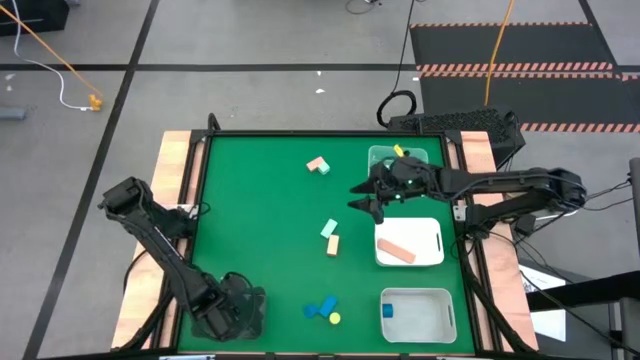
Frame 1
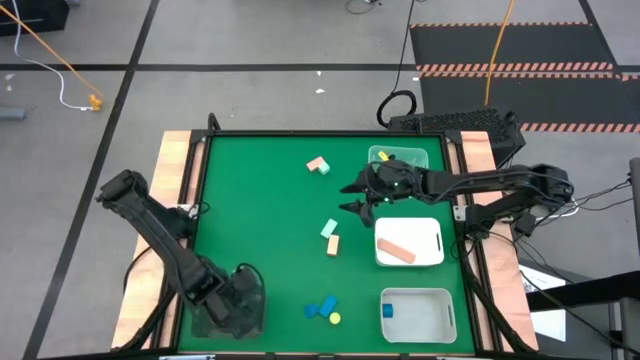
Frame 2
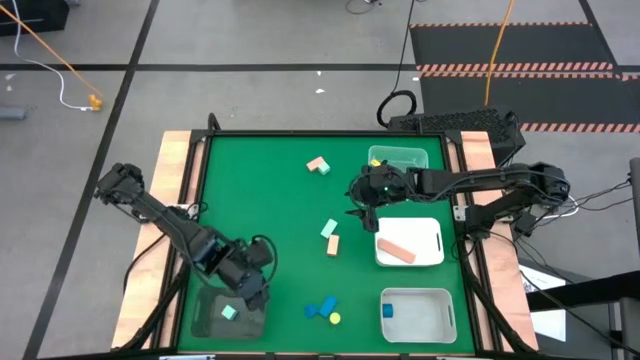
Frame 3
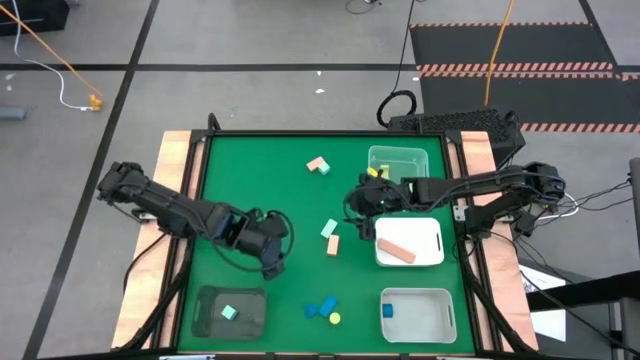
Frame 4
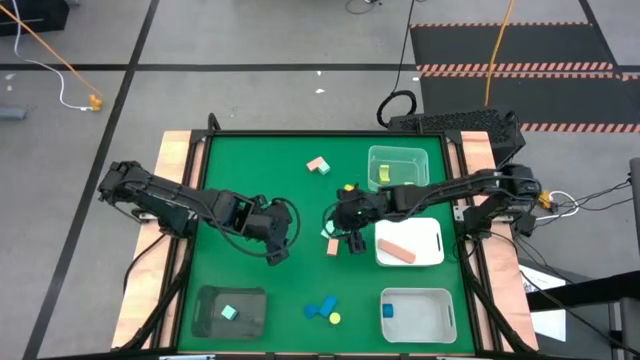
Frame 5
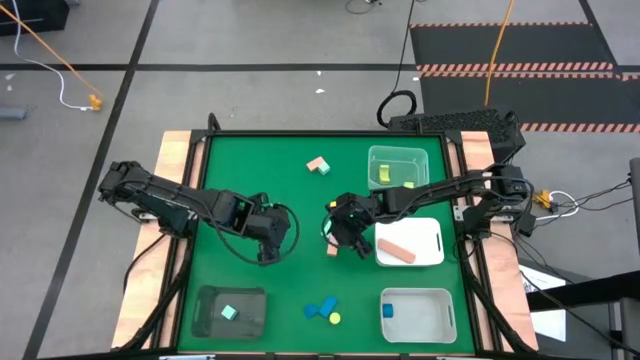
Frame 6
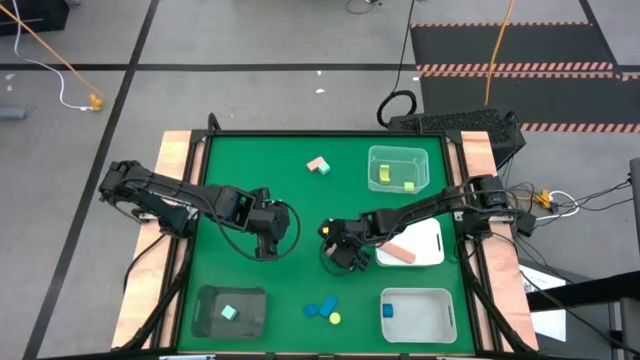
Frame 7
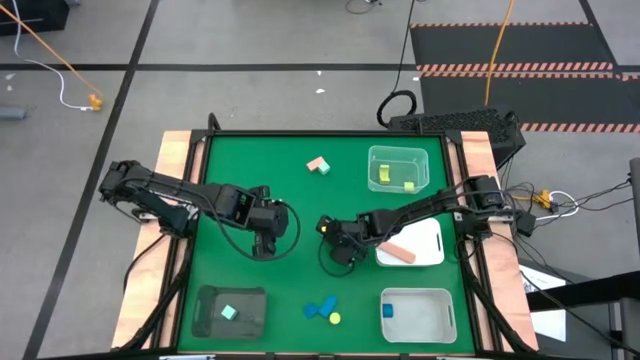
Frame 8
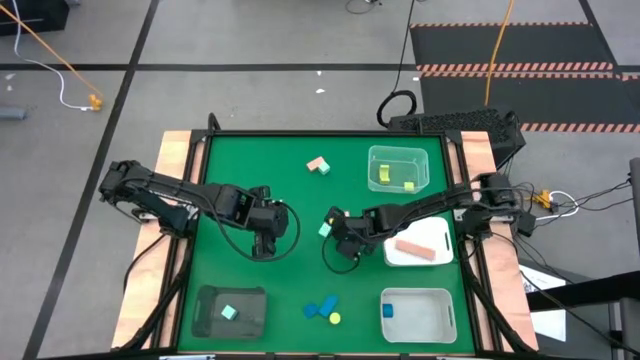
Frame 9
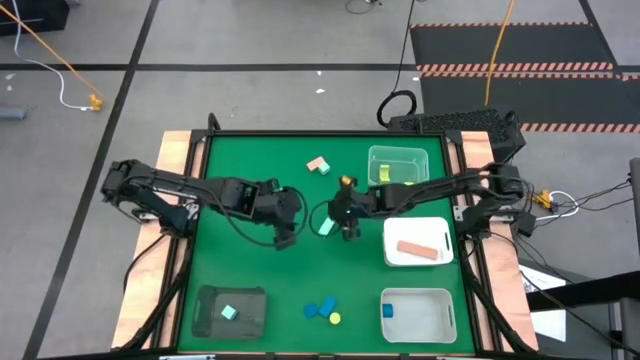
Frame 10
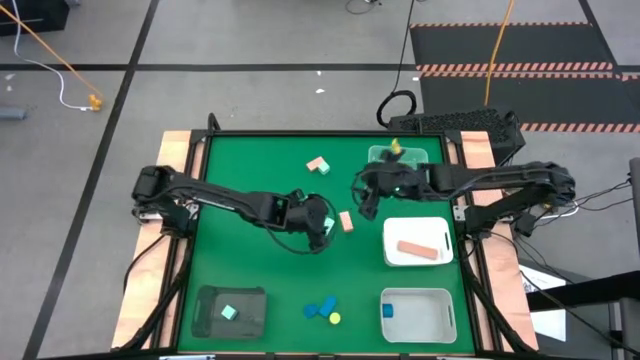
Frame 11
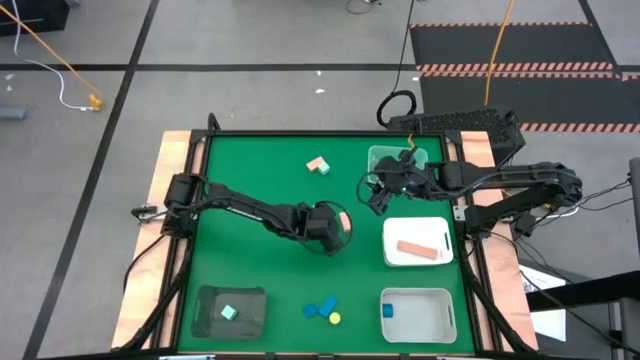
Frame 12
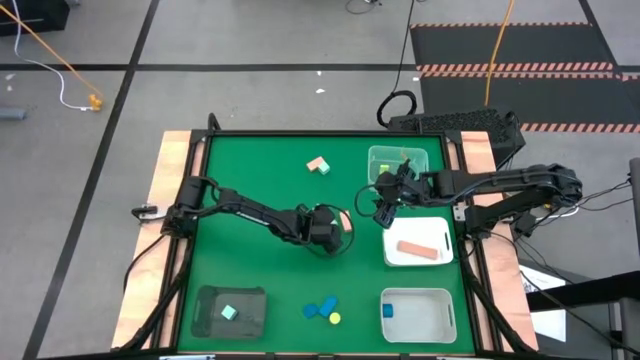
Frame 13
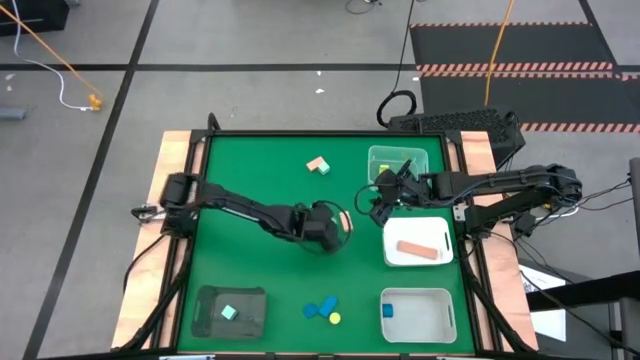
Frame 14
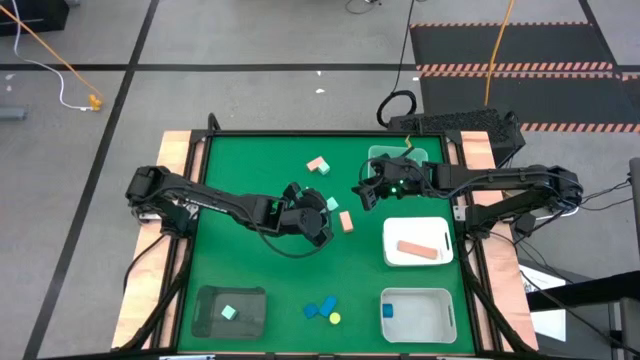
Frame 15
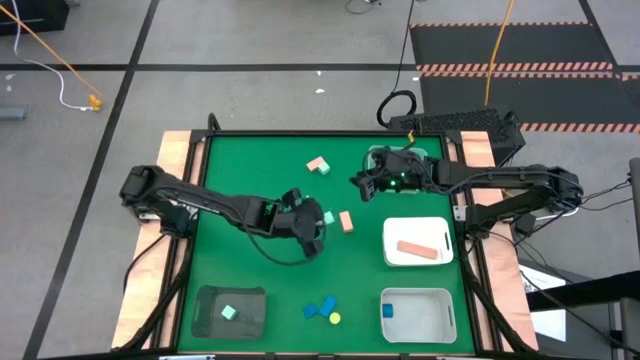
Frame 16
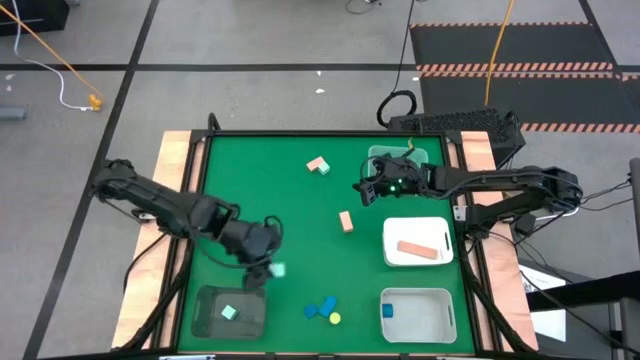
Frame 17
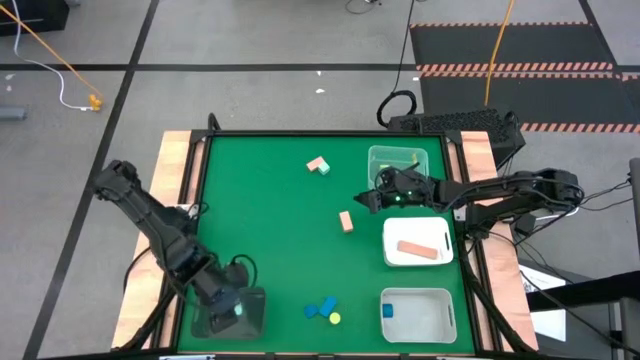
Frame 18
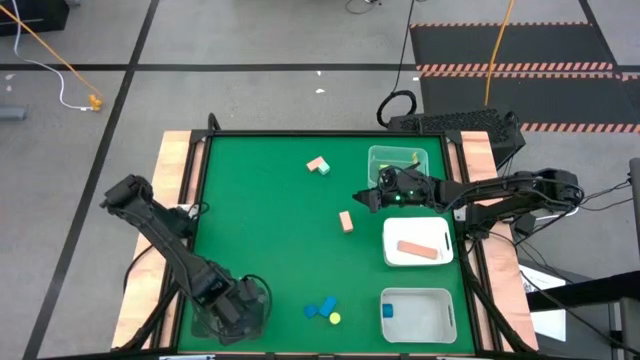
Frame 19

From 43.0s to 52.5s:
Task: Sort & place blocks by color
Put the bottom light blue block into the black transparent bin

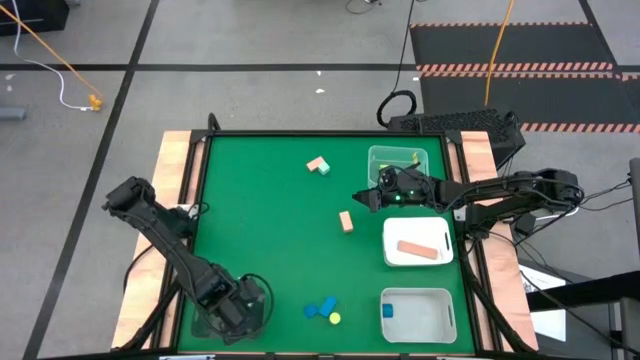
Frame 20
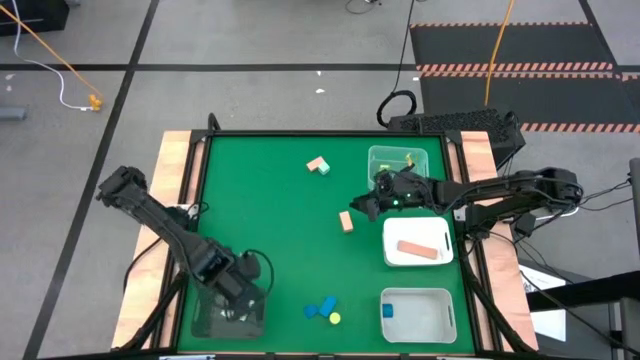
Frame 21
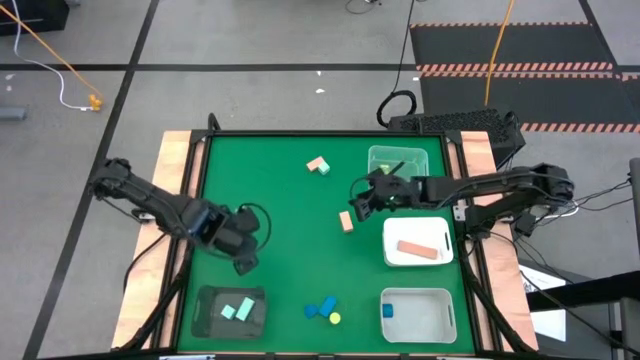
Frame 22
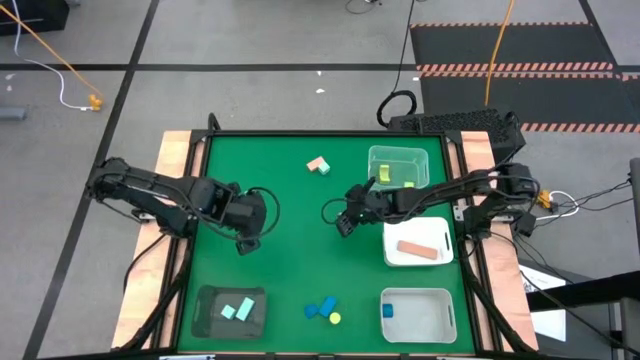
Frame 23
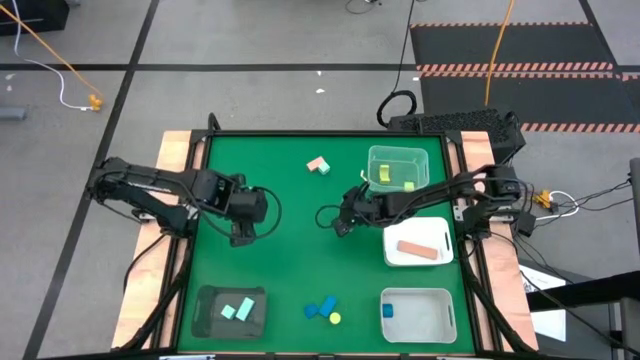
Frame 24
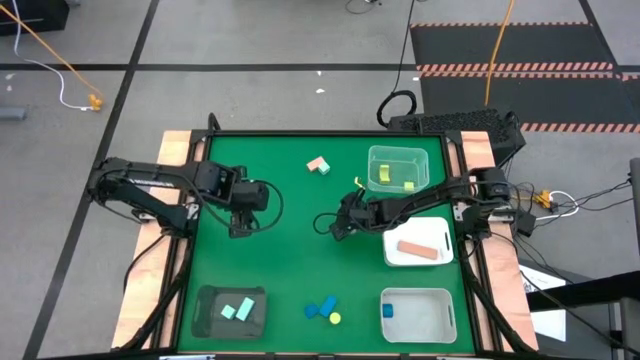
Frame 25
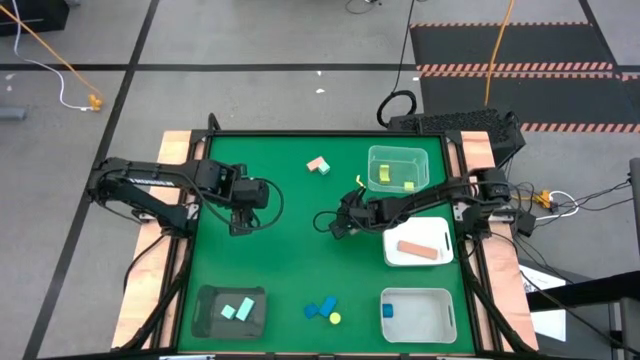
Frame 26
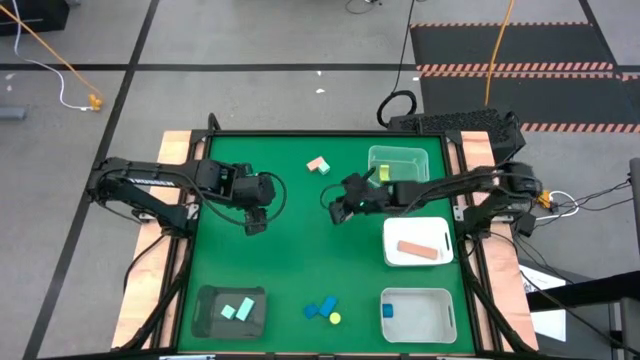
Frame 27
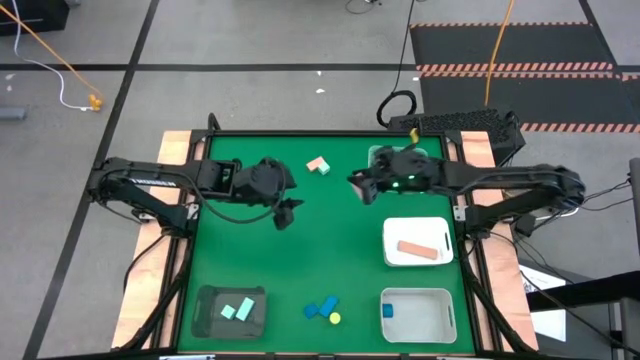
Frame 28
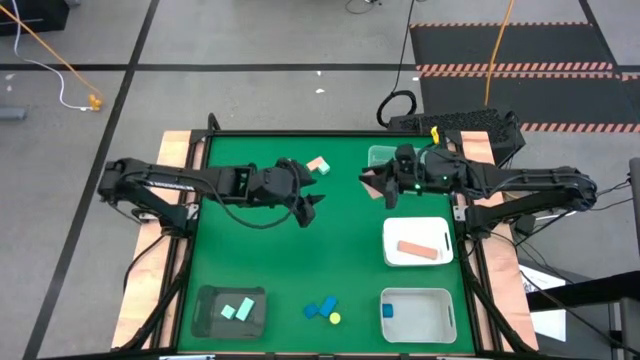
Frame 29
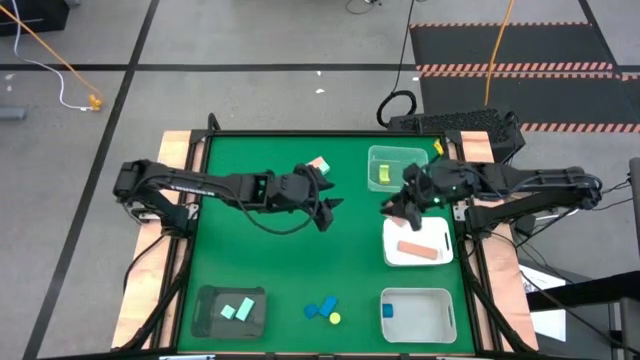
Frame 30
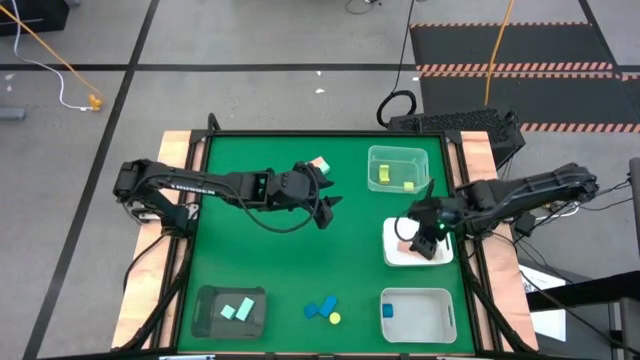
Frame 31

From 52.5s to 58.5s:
Put the bottom brown block into the white bin

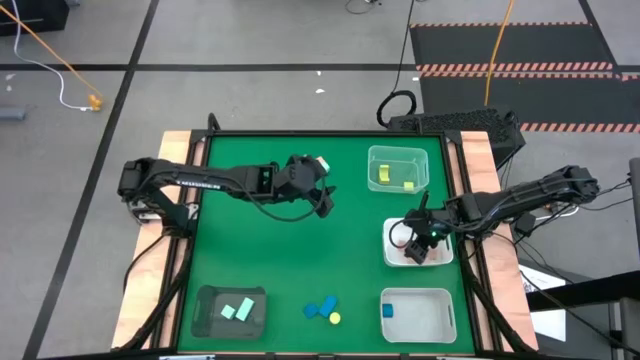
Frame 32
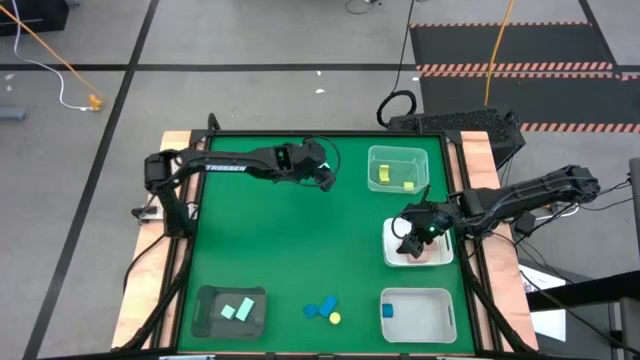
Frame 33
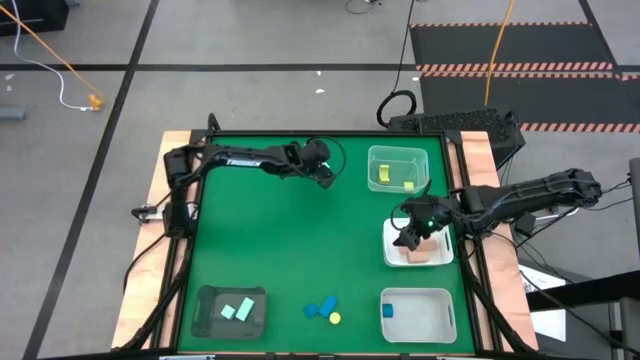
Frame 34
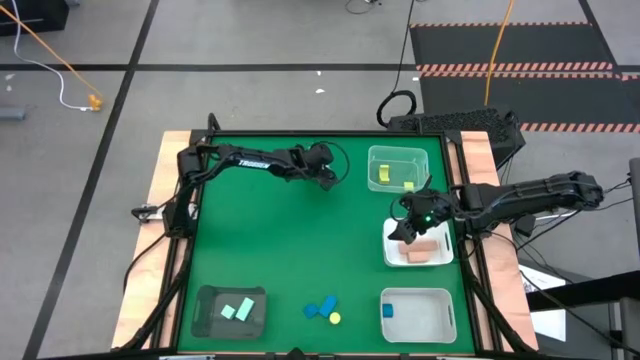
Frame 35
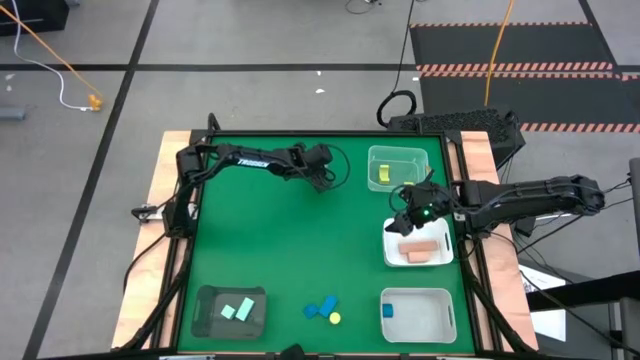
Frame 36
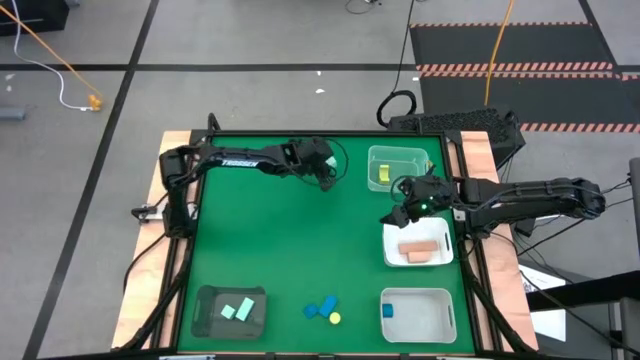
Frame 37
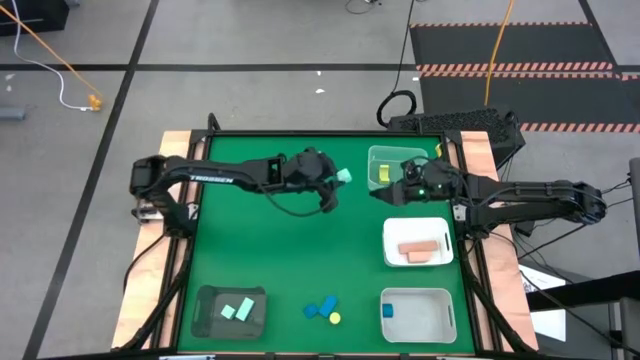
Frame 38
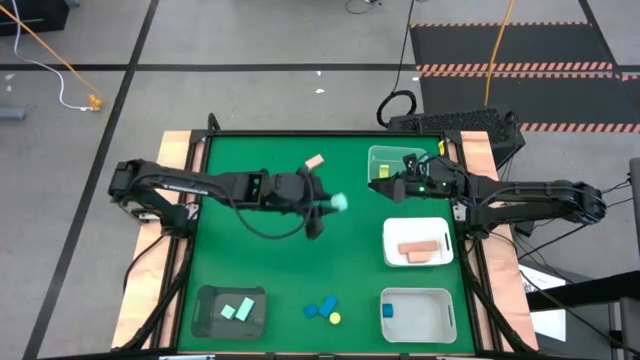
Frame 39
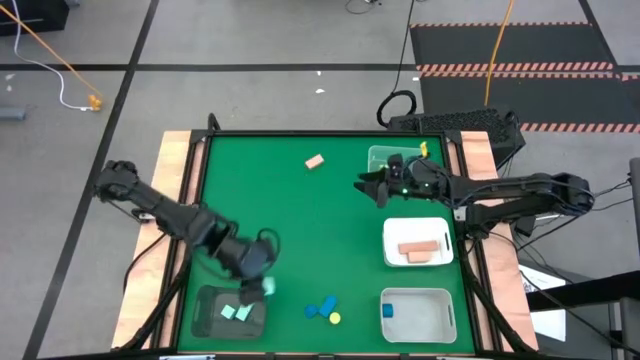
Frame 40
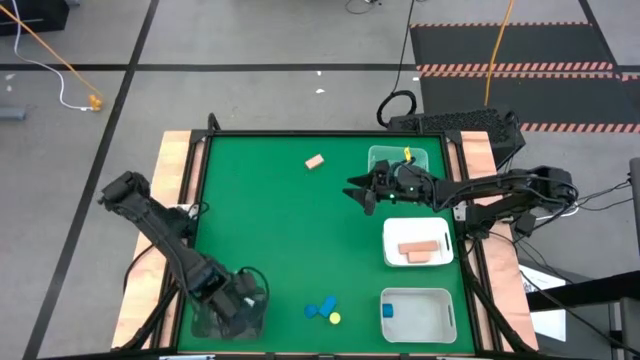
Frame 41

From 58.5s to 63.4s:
Put the light blue block into the black transparent bin

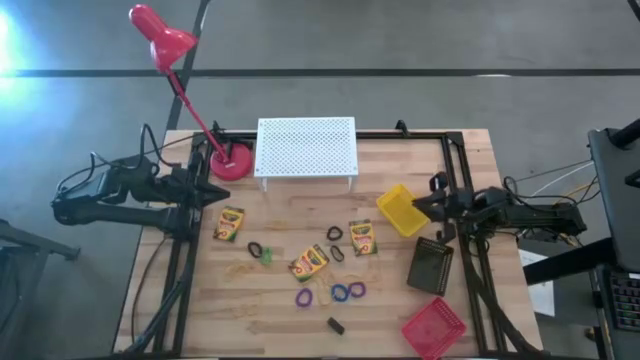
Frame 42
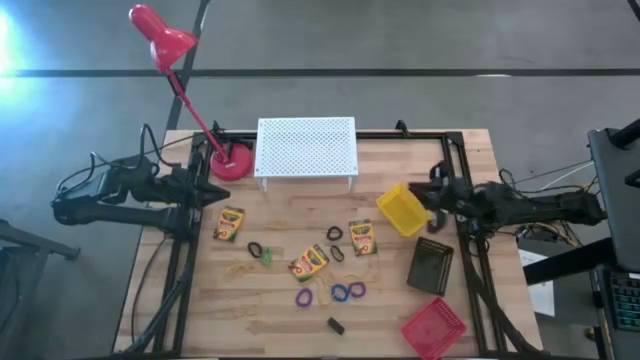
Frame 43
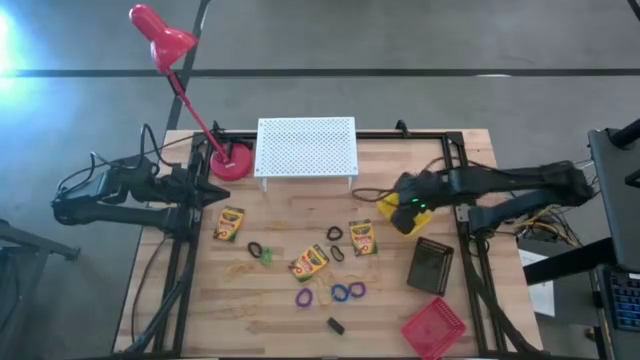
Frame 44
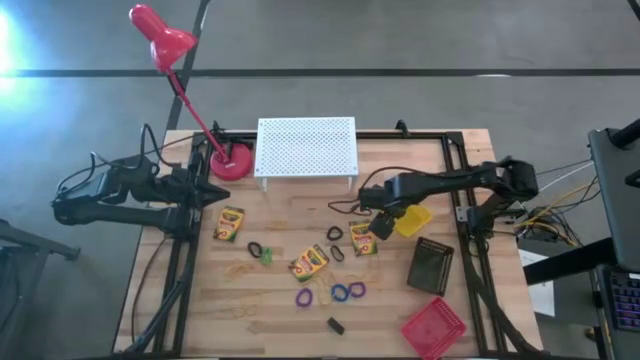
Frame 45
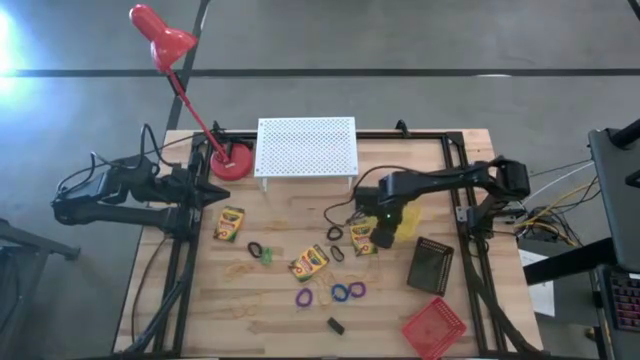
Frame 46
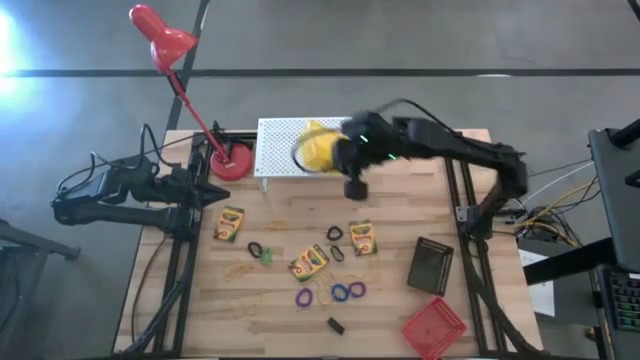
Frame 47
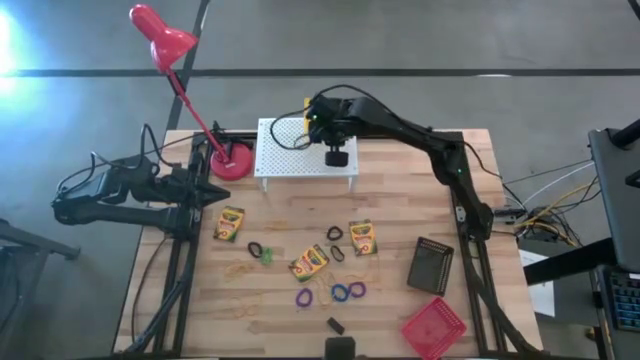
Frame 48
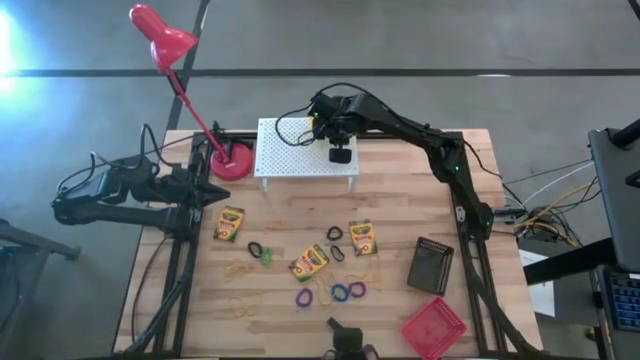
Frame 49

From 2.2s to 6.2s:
Task: Pick & Place Office Desk Supplies
Put the yellow bin on the shelf
